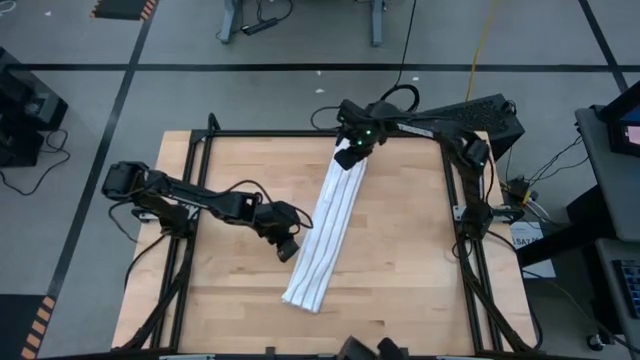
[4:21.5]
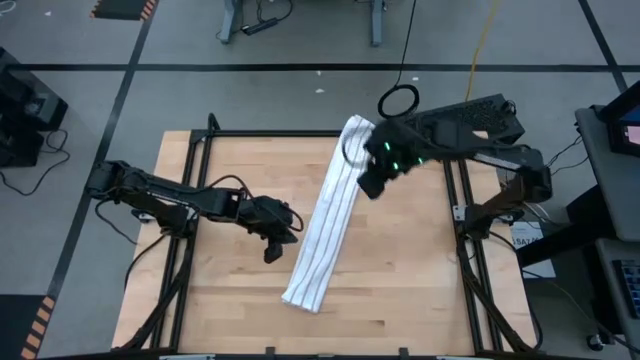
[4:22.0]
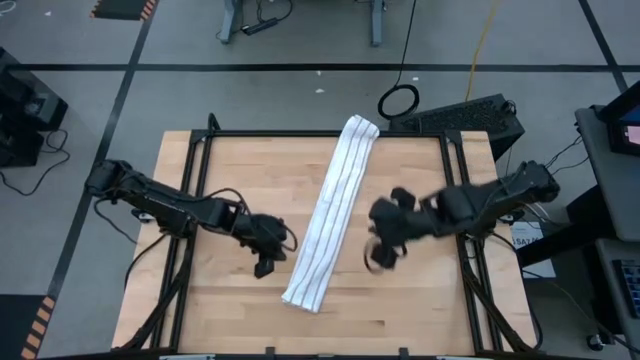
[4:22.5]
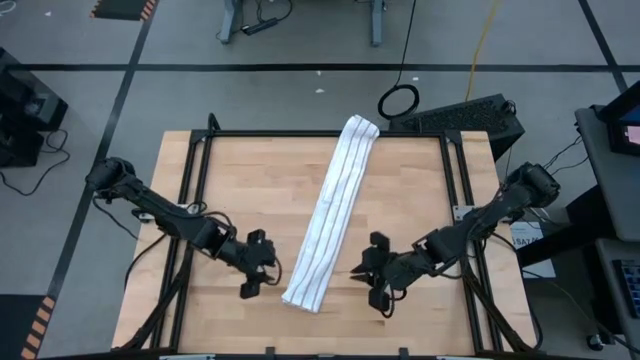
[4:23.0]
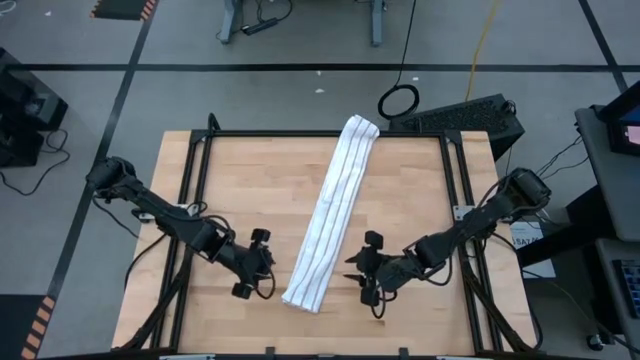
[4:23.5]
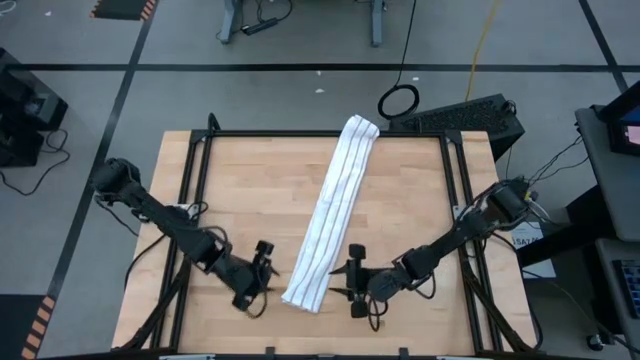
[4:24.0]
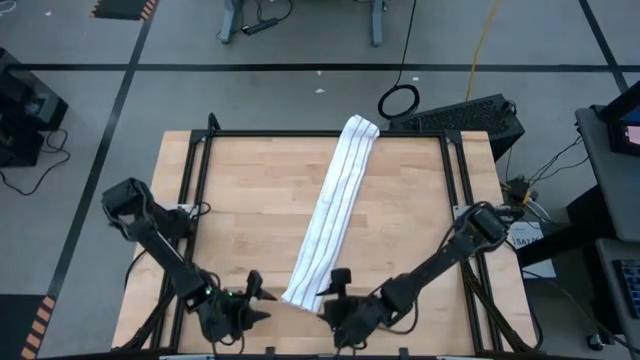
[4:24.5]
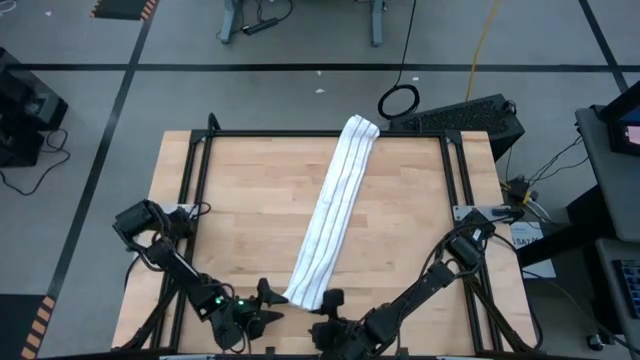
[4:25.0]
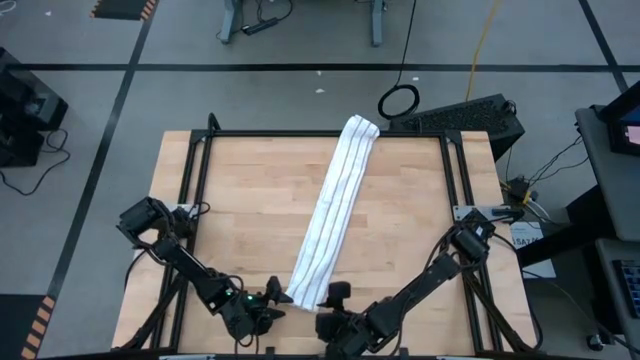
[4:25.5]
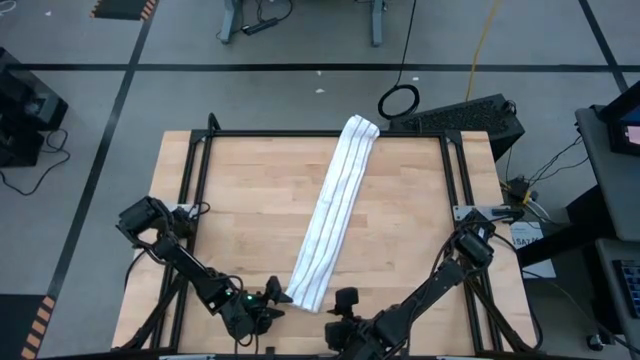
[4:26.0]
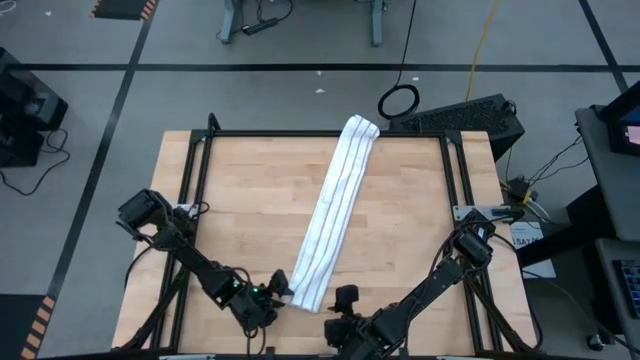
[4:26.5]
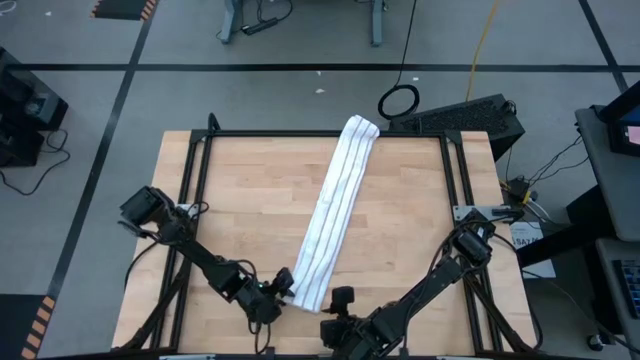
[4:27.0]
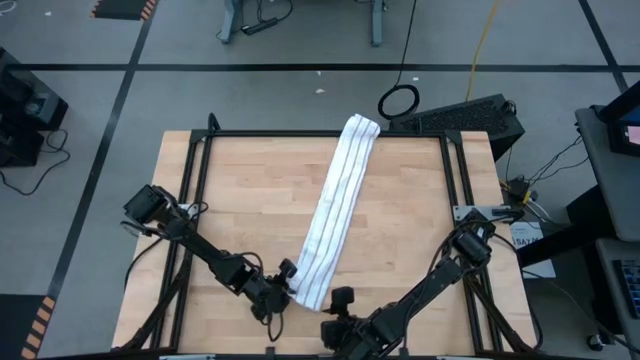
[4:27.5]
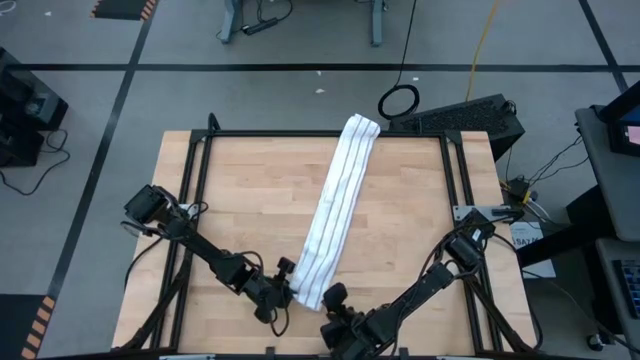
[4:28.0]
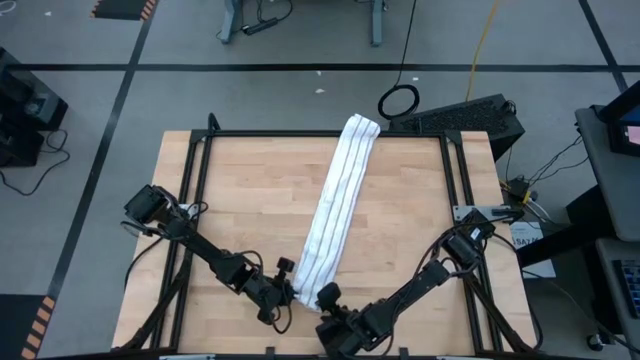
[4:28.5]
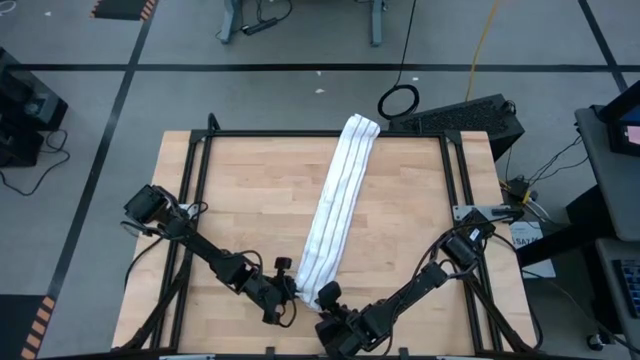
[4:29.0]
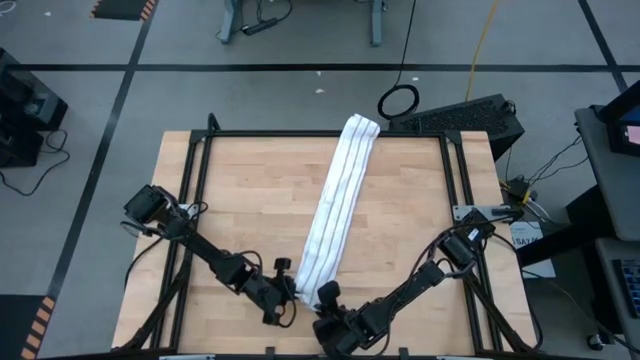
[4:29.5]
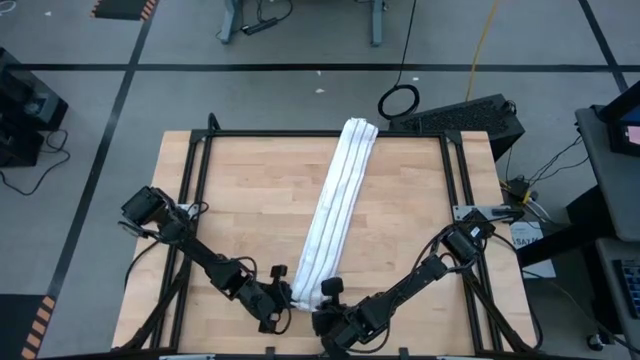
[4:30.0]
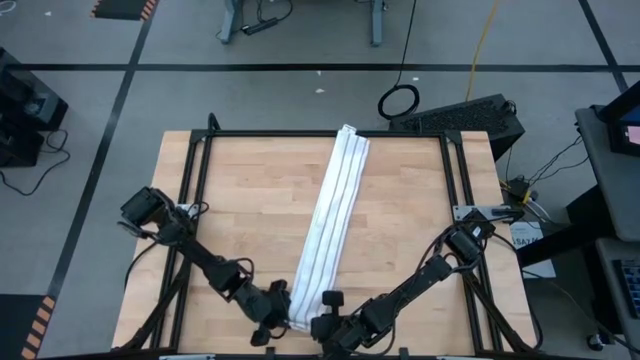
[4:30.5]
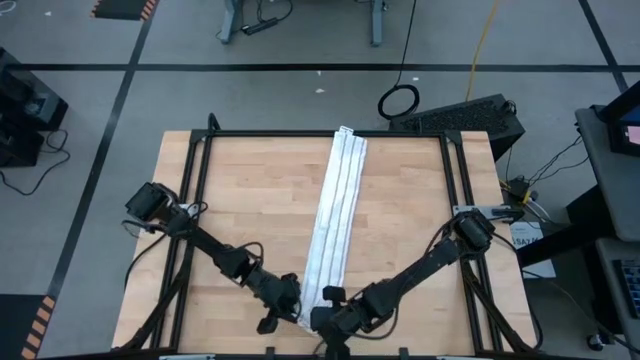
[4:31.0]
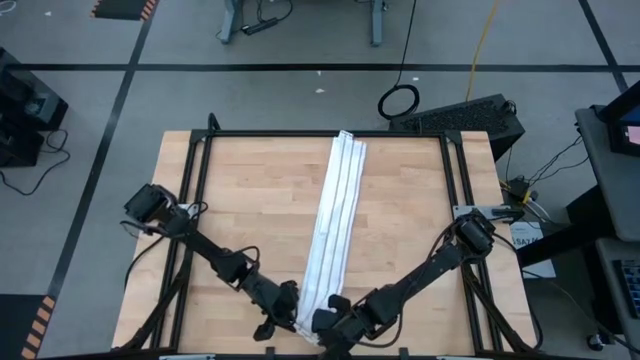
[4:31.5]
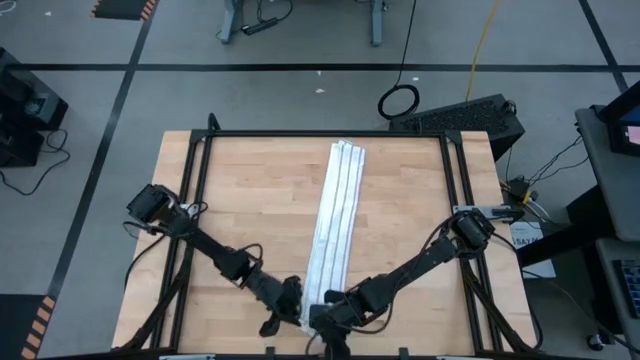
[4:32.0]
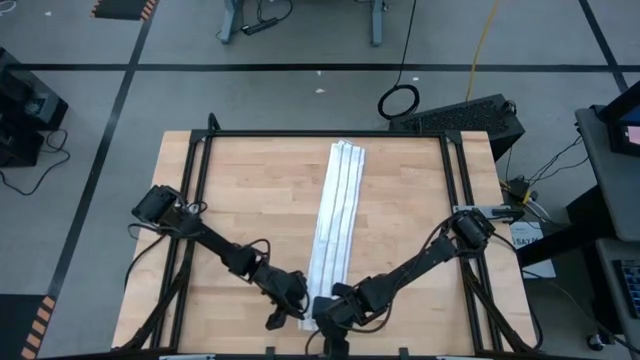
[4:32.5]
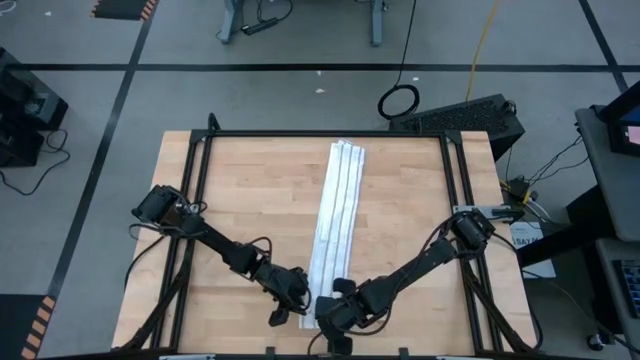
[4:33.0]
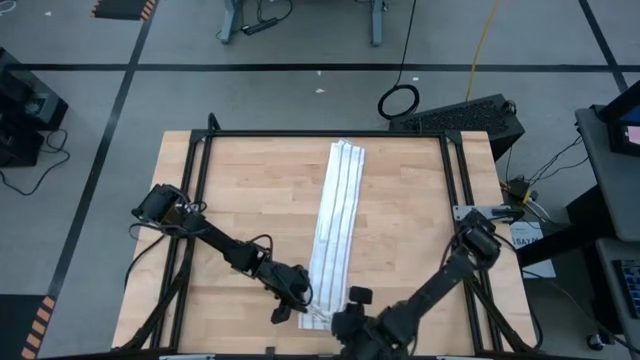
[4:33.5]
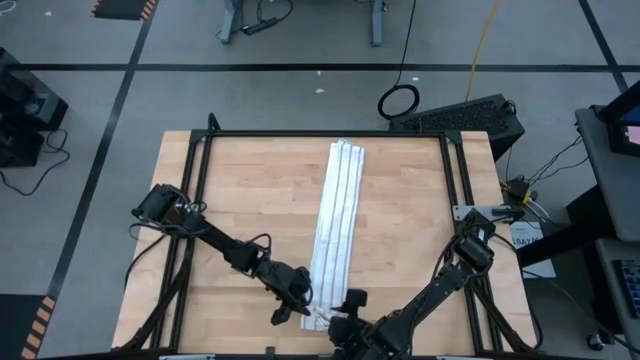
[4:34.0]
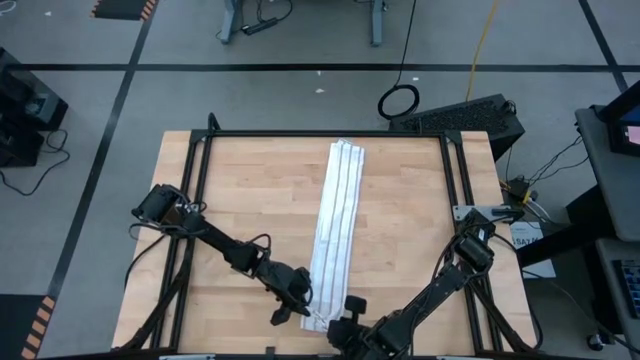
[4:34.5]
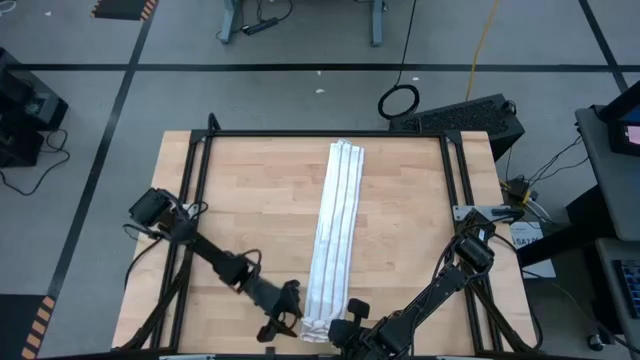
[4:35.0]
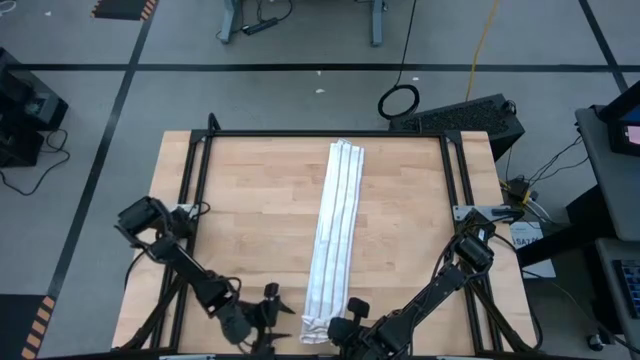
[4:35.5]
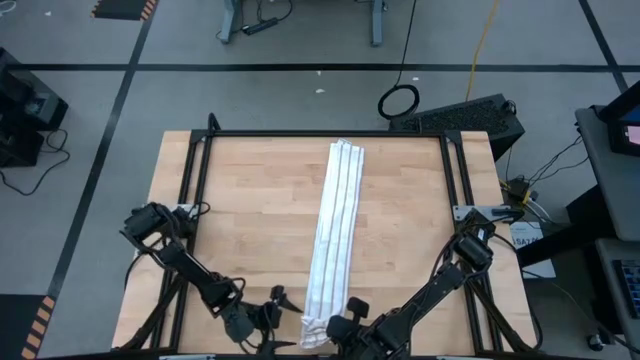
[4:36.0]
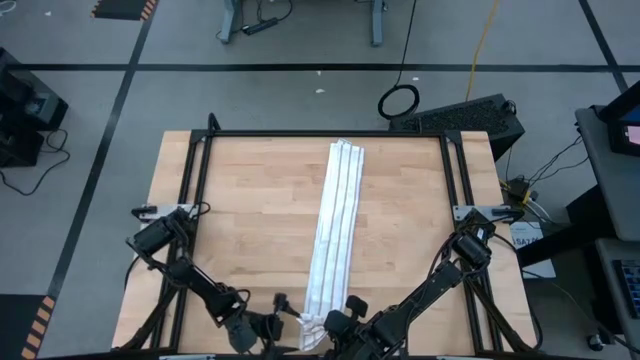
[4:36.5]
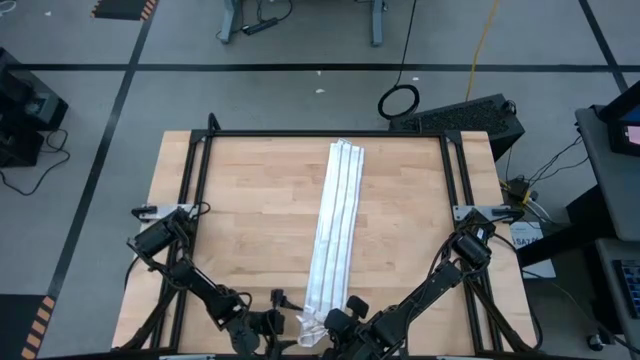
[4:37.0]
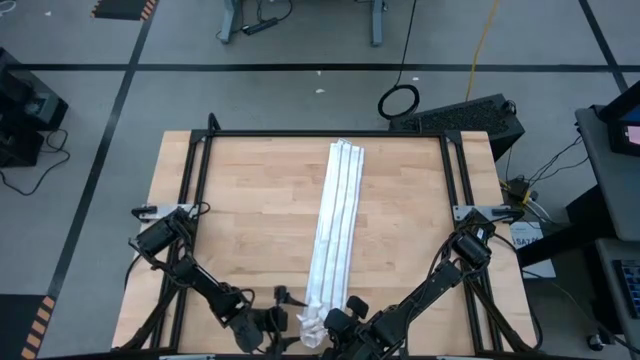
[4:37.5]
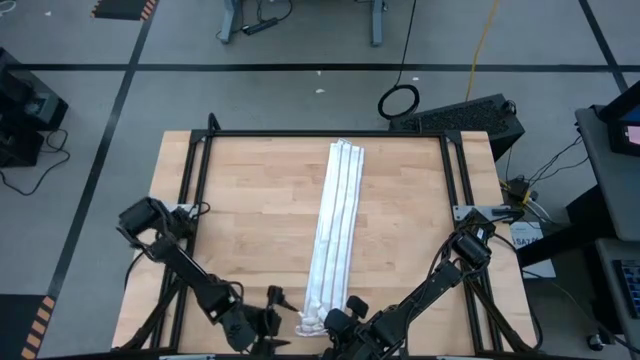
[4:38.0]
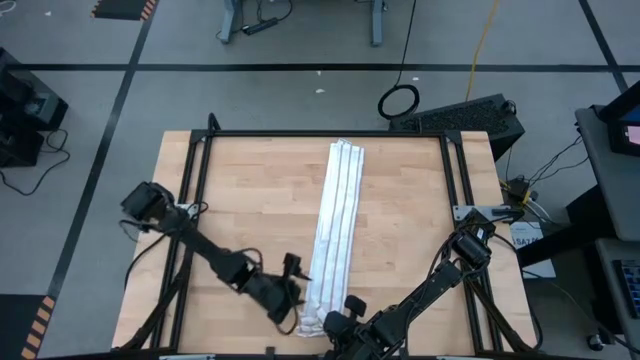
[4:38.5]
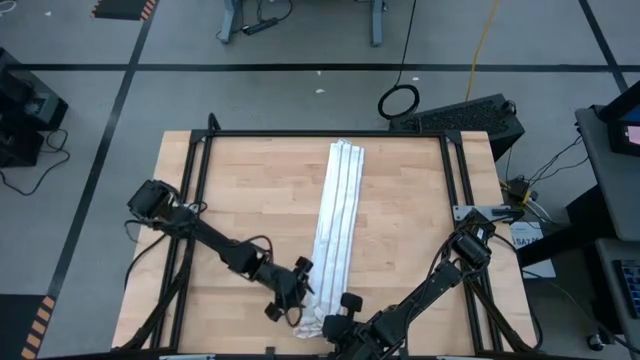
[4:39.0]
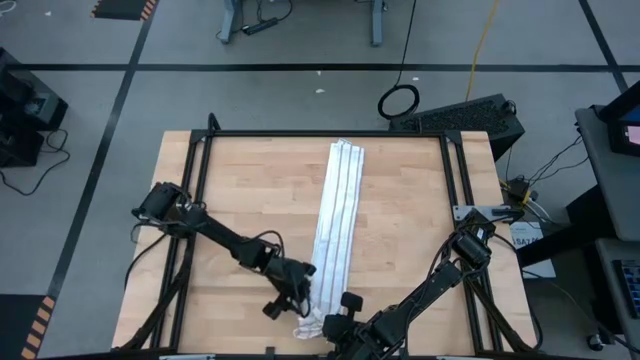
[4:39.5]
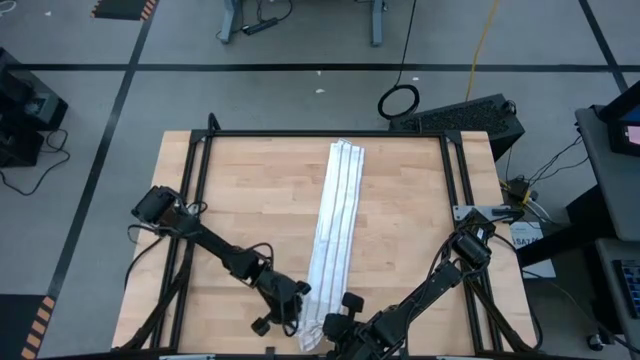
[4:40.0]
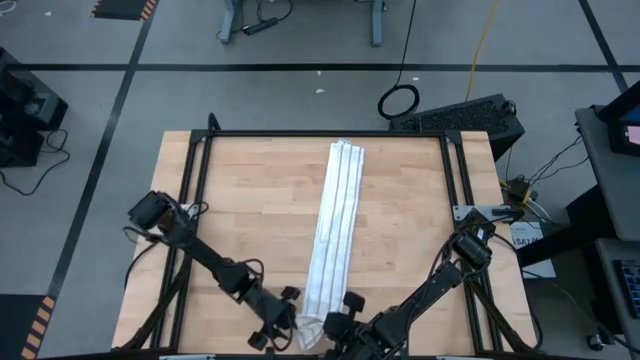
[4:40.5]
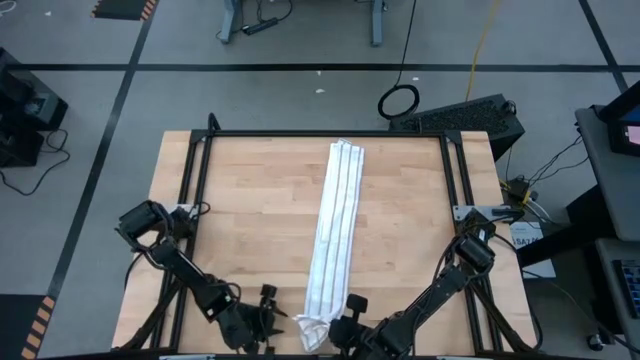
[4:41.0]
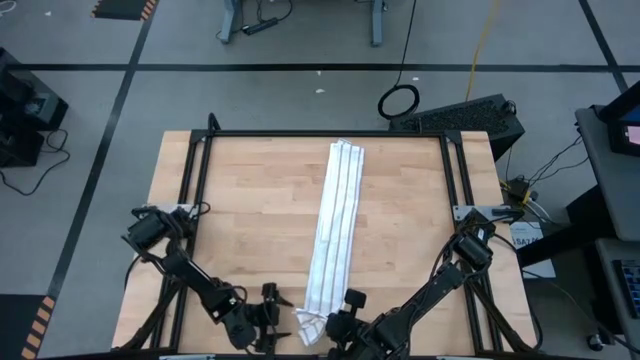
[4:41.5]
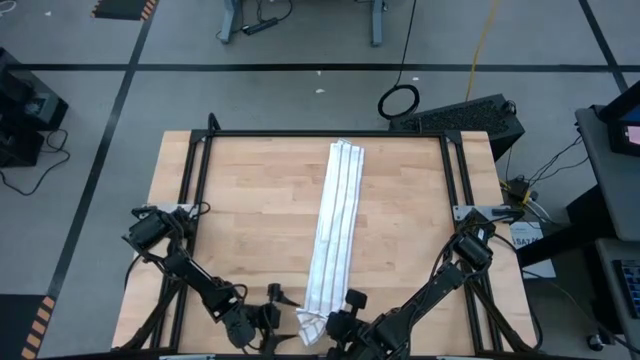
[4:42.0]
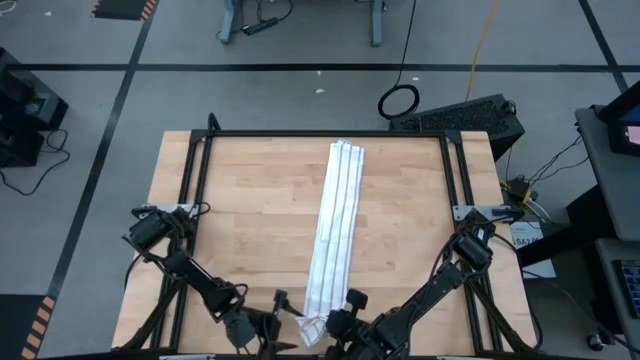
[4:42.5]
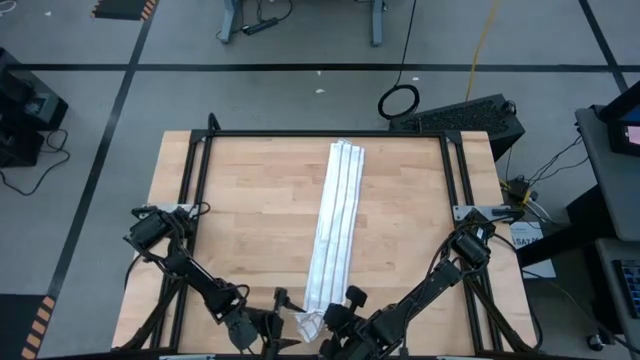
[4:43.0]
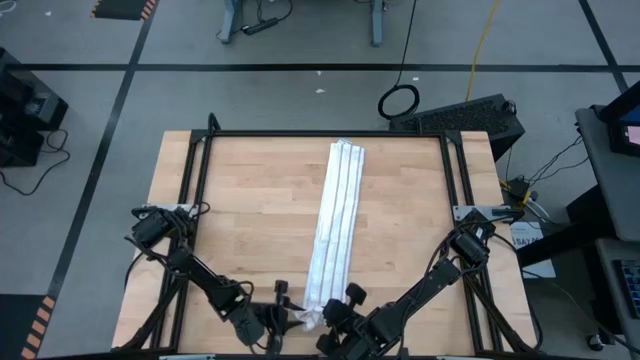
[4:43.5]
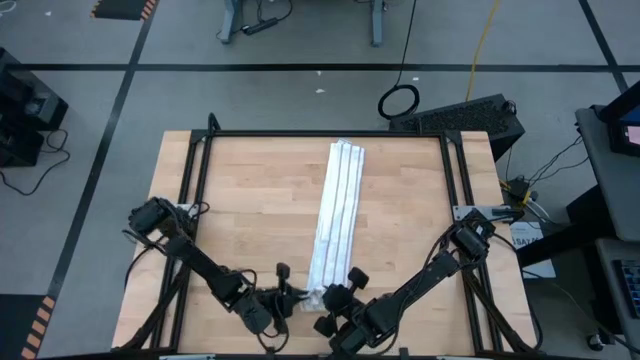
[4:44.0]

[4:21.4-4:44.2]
Task: Roll towel into tight, uniform cylinder
Roll the white brown kitchen towel
